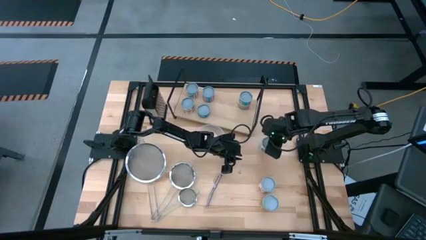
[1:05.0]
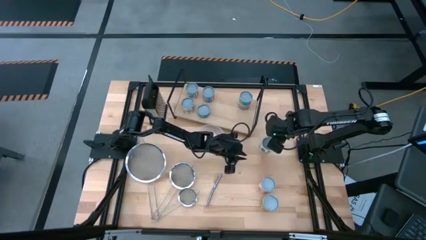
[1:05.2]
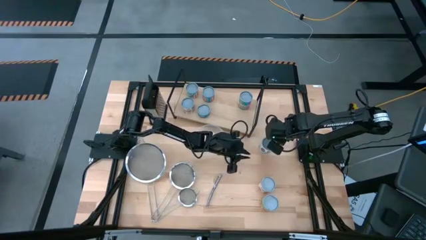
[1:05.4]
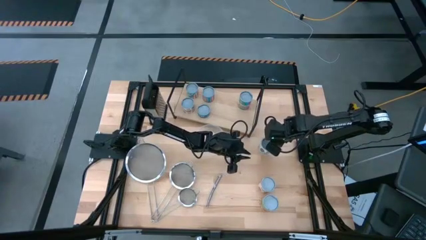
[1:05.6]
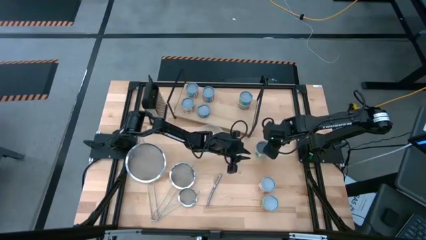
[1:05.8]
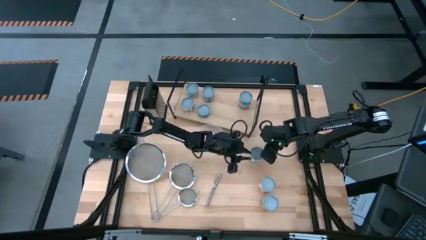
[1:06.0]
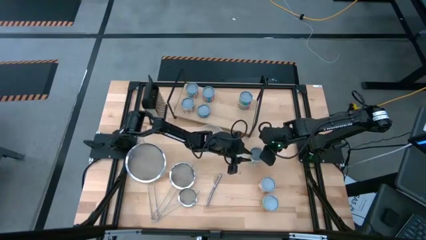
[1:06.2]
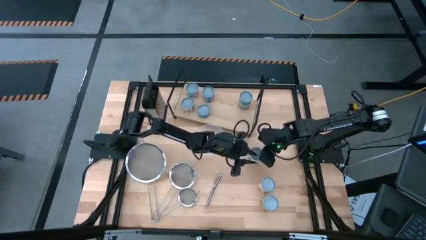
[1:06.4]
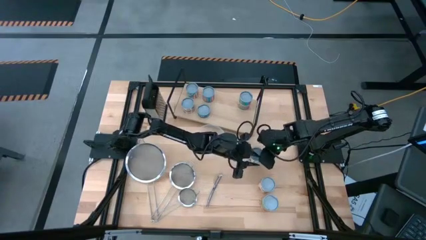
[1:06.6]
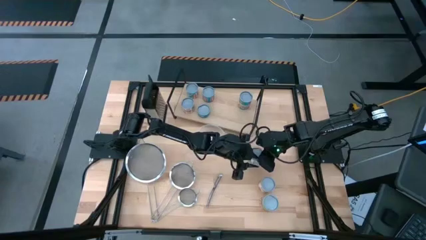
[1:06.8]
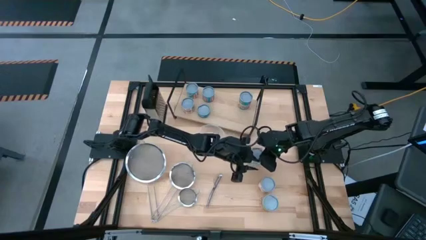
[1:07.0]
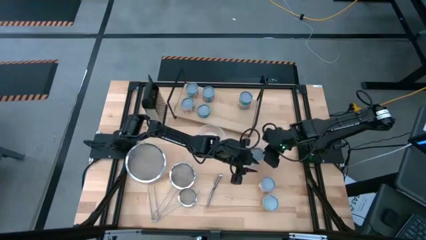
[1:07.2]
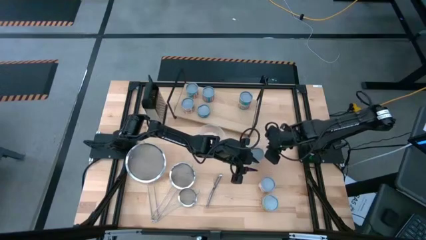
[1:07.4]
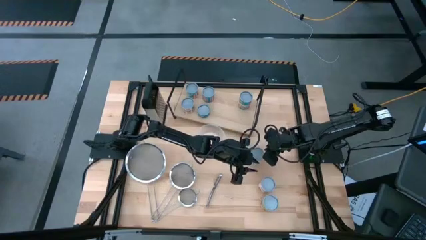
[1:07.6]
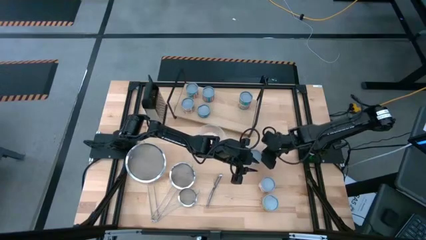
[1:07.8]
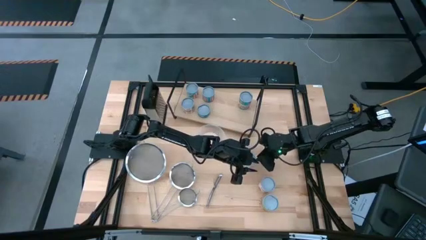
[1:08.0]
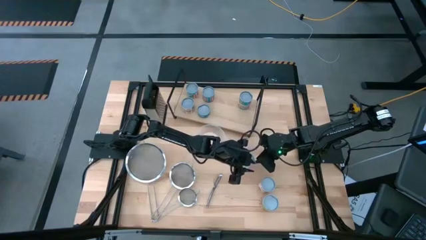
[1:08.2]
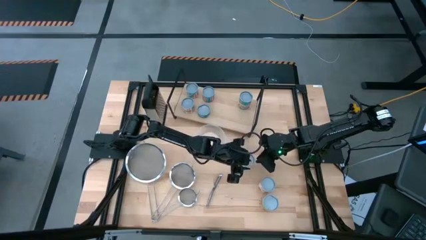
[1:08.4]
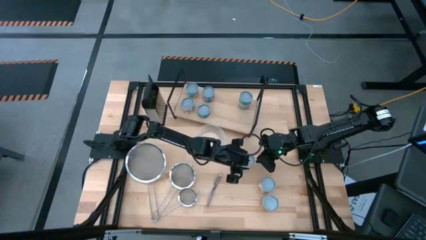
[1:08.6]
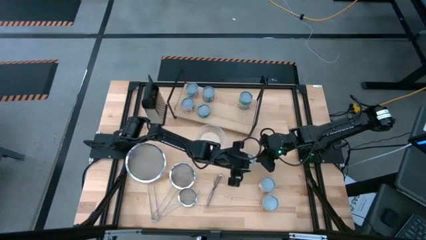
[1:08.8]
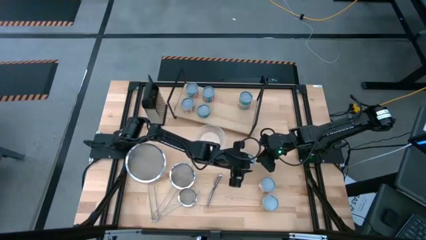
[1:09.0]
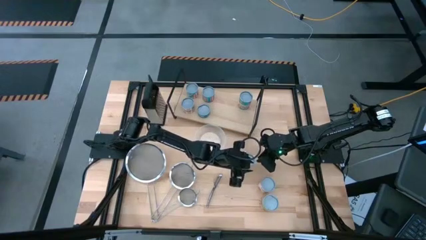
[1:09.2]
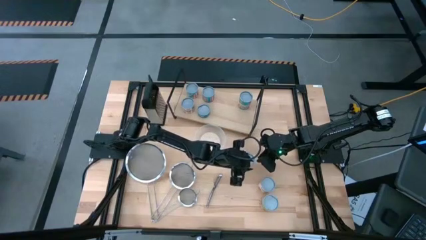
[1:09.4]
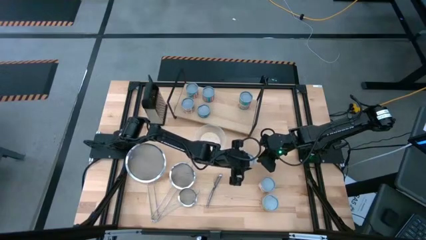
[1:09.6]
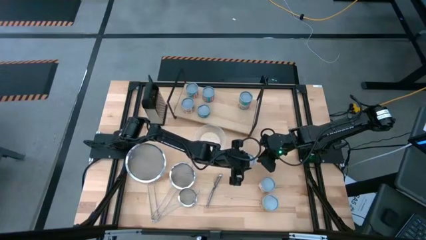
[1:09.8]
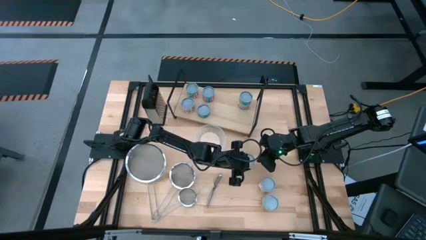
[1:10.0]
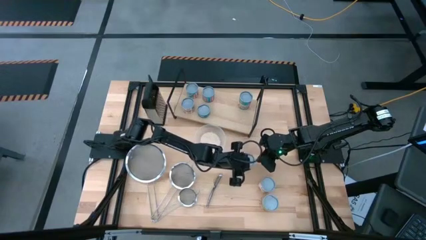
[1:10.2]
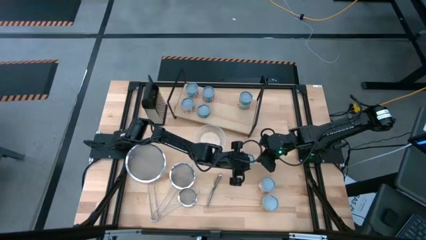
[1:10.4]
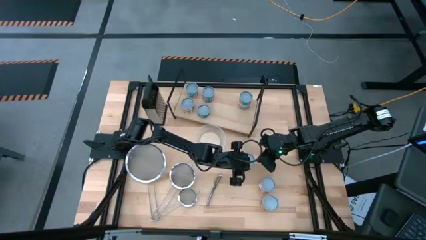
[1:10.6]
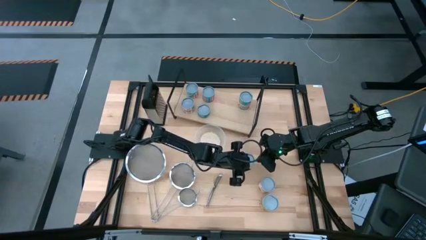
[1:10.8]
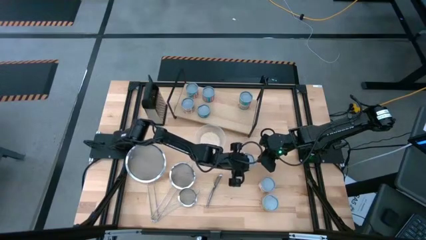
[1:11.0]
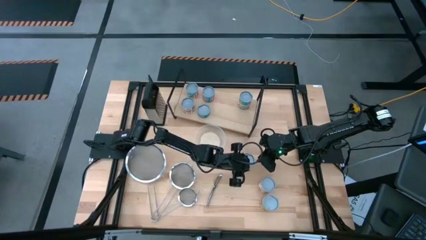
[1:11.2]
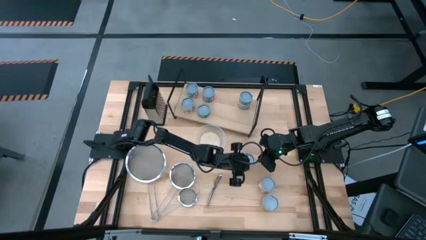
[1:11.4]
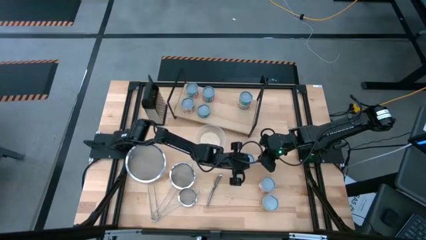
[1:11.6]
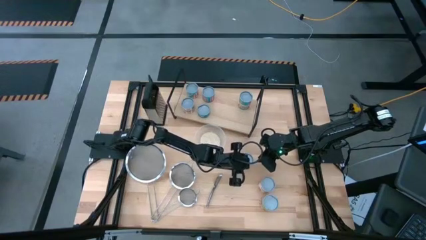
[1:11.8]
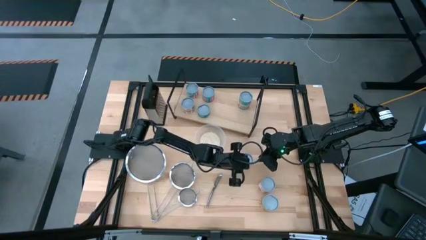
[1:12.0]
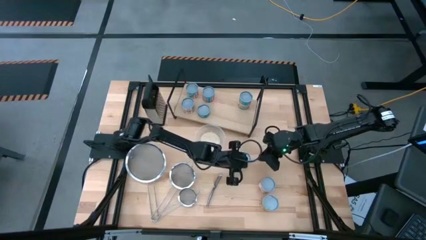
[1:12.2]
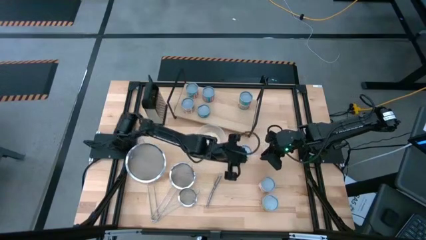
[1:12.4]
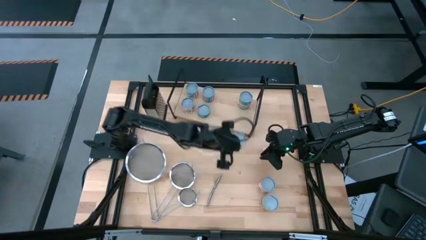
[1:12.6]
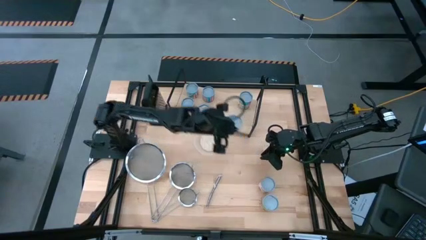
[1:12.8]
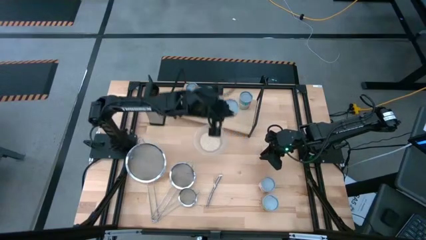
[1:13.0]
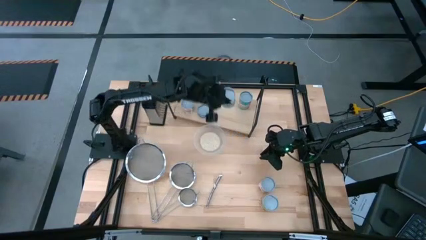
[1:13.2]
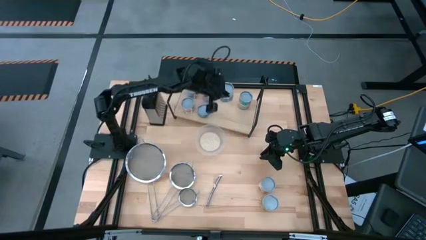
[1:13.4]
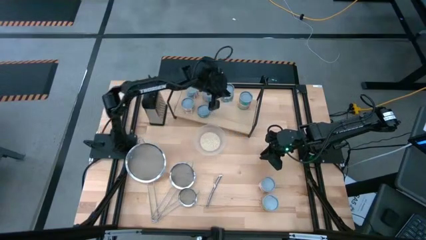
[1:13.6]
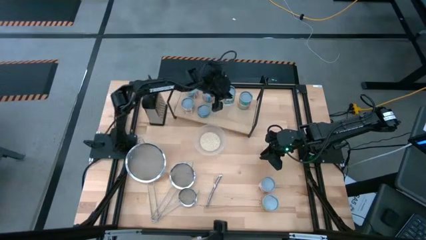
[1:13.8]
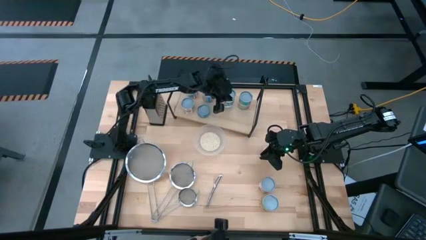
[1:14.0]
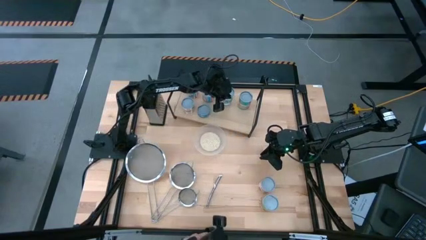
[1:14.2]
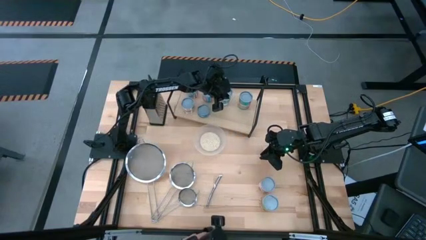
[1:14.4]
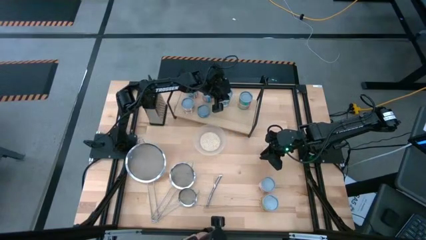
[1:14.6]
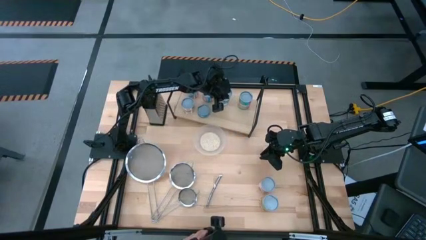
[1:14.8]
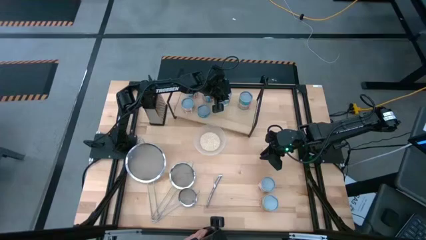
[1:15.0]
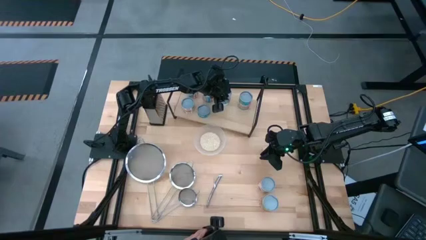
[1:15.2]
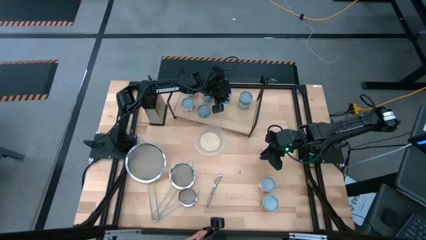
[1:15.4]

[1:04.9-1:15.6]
Task: Pick and place cans onto a shelf
Put the canned mixed vegetables on the shelf

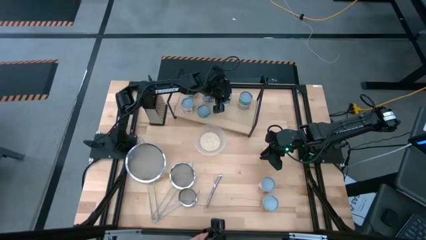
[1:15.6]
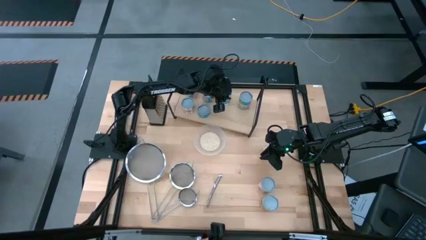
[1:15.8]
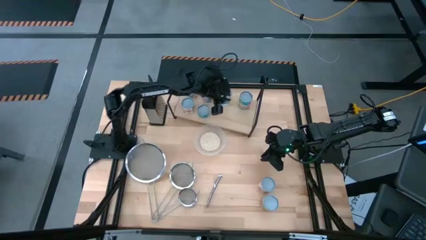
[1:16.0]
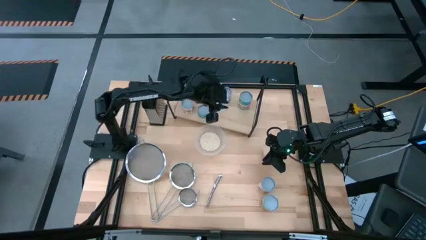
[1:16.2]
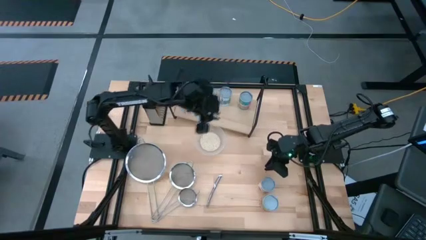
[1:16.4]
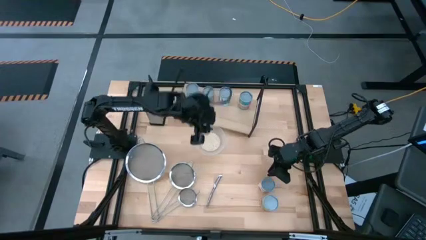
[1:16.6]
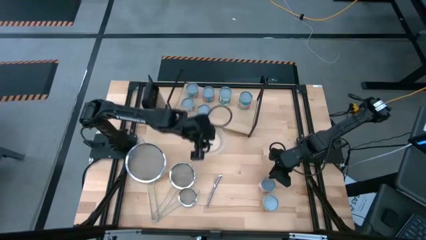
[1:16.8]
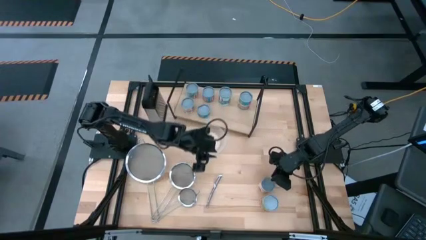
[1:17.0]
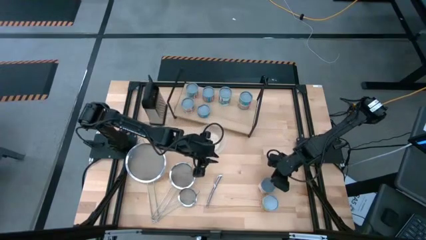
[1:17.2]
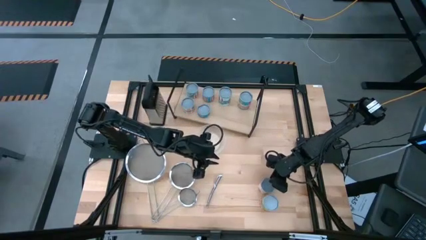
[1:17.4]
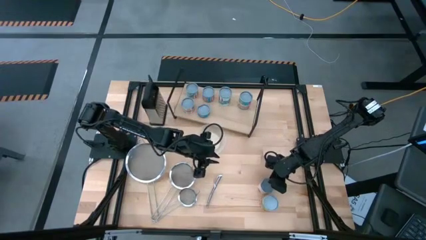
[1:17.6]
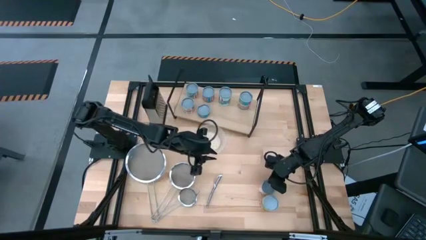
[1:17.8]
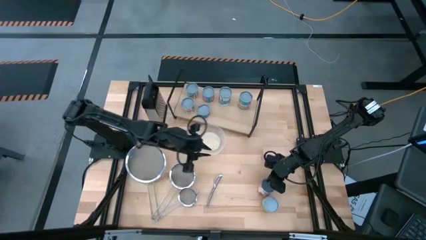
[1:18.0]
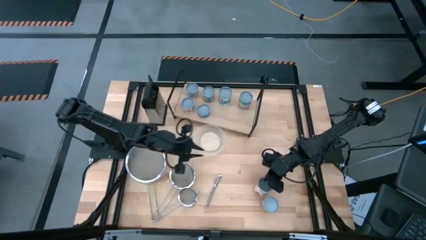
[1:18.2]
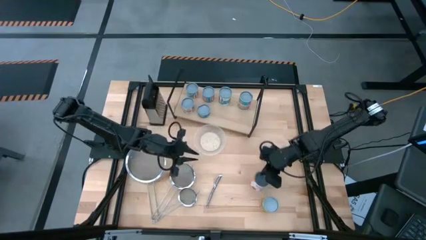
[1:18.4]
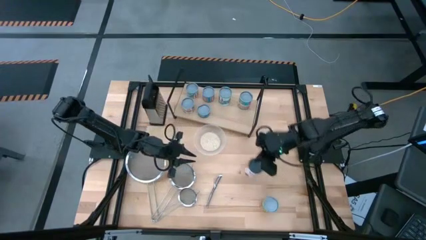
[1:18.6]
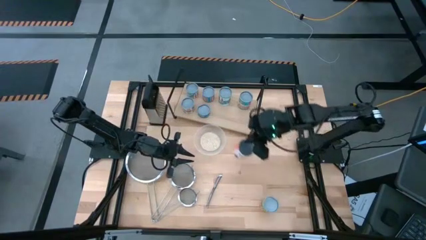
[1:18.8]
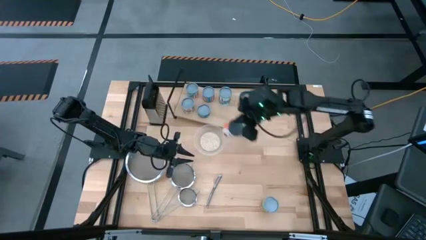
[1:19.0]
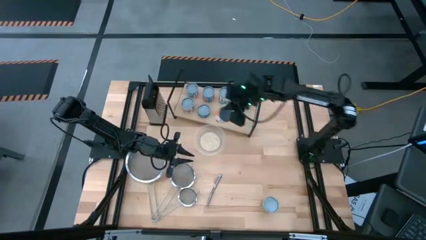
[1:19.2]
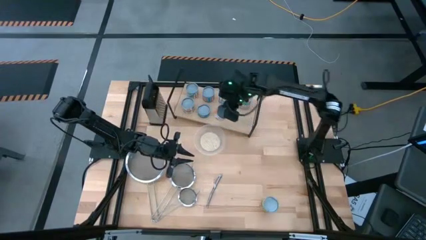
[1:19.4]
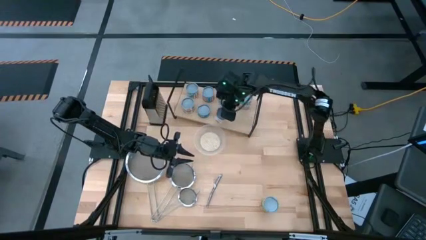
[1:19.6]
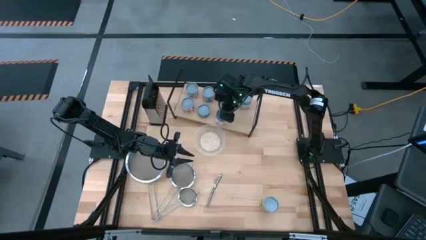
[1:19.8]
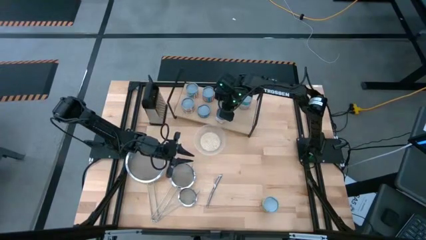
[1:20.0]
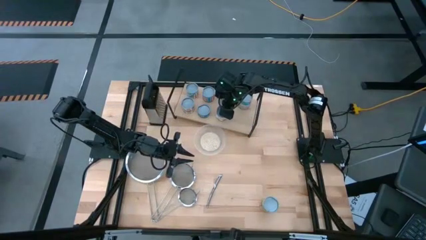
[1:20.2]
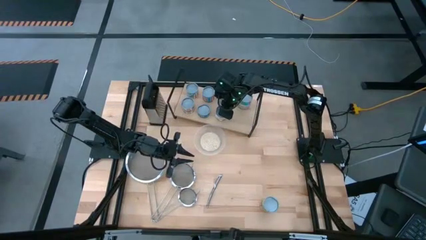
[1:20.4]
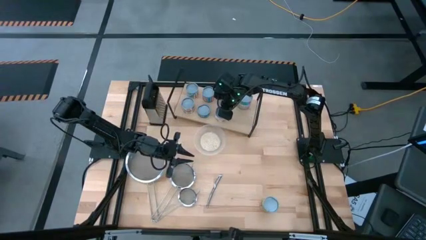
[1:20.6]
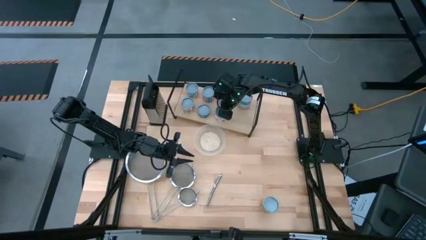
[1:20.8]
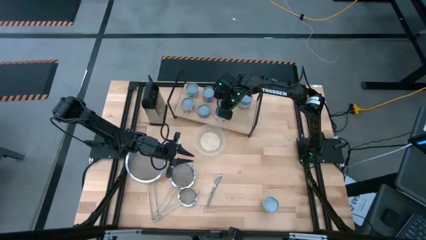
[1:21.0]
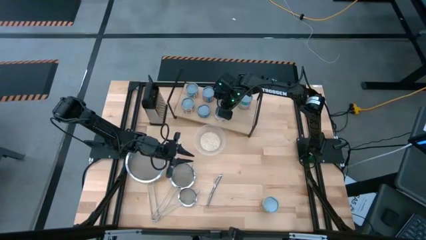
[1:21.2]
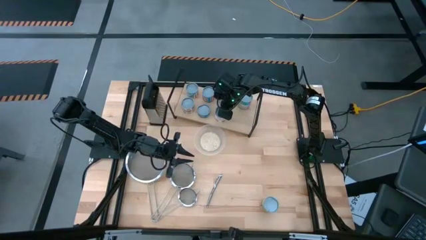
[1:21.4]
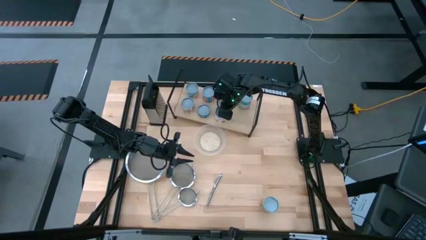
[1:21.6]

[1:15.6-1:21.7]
Put the canned sauce on the shelf
